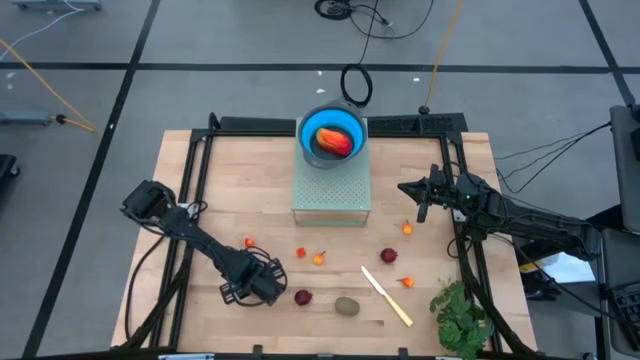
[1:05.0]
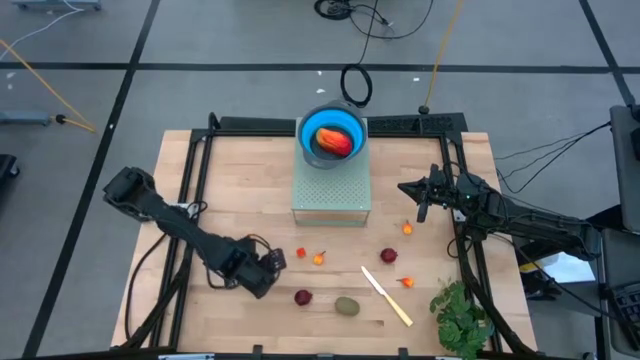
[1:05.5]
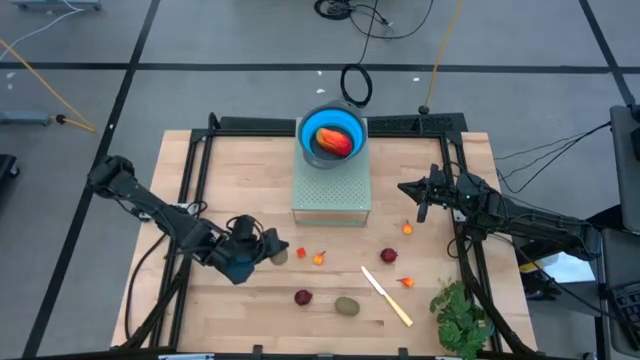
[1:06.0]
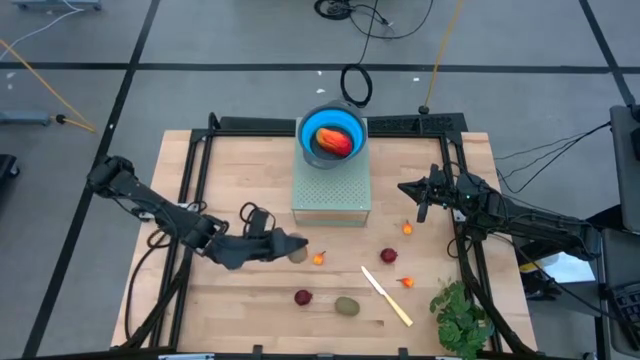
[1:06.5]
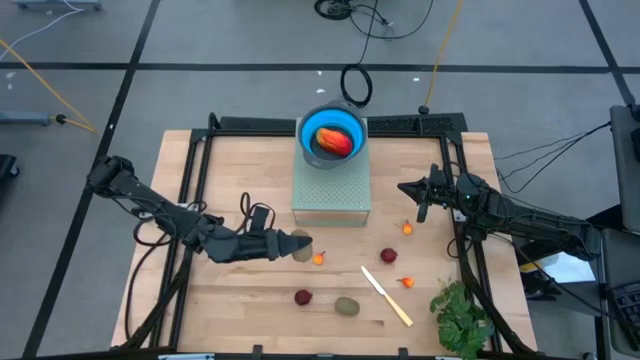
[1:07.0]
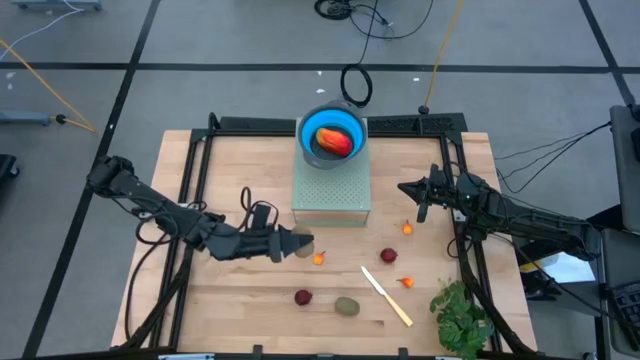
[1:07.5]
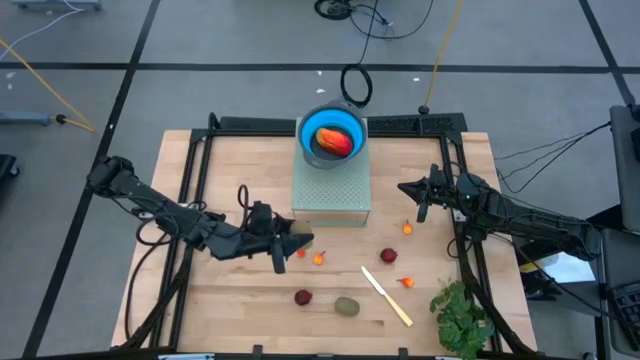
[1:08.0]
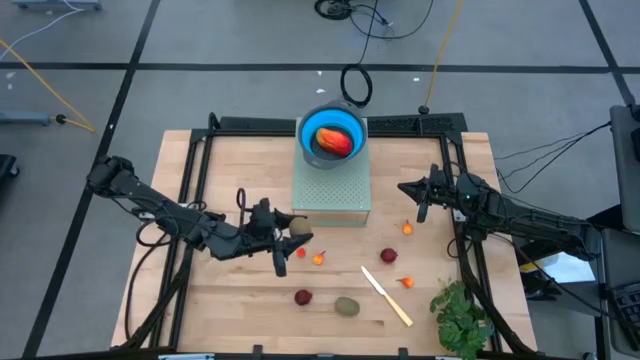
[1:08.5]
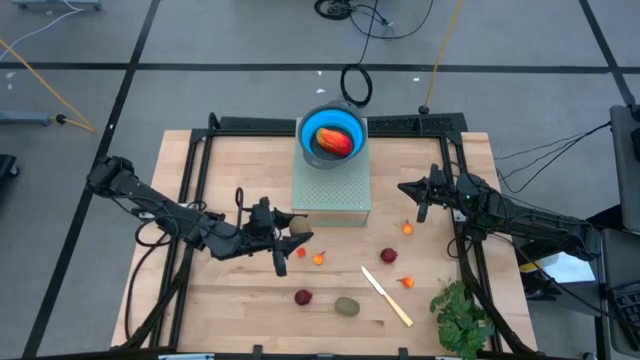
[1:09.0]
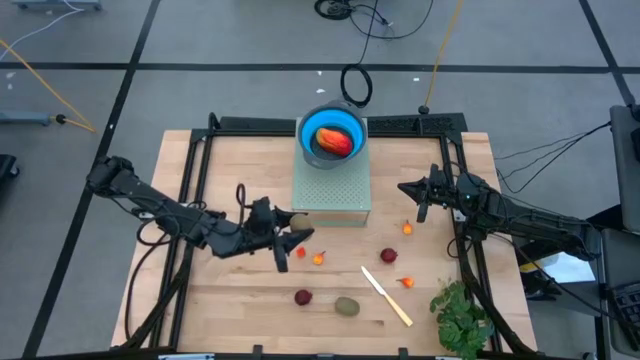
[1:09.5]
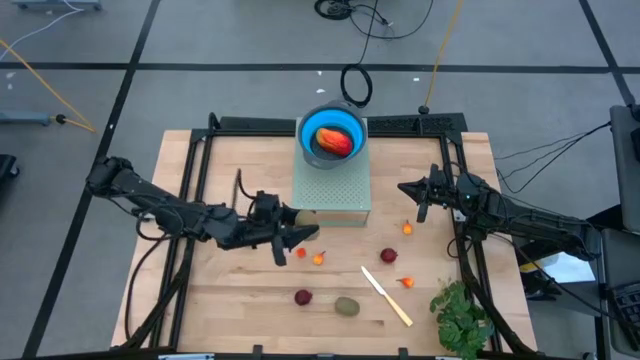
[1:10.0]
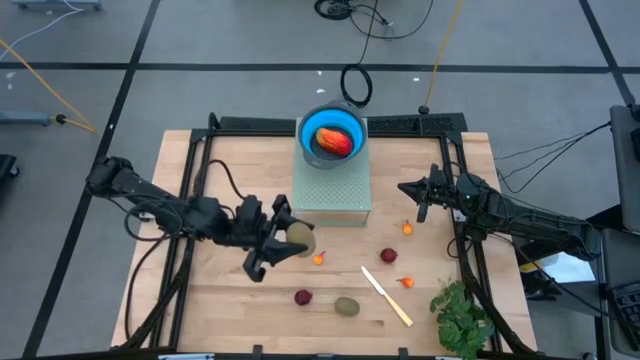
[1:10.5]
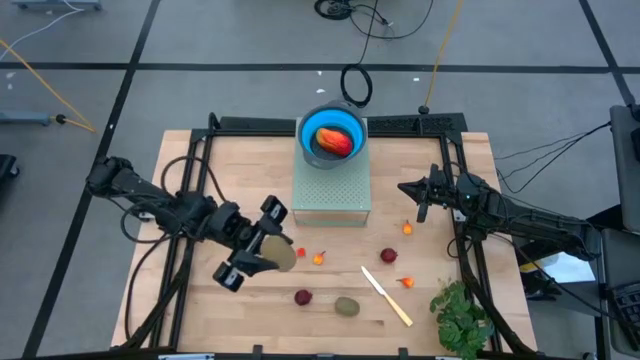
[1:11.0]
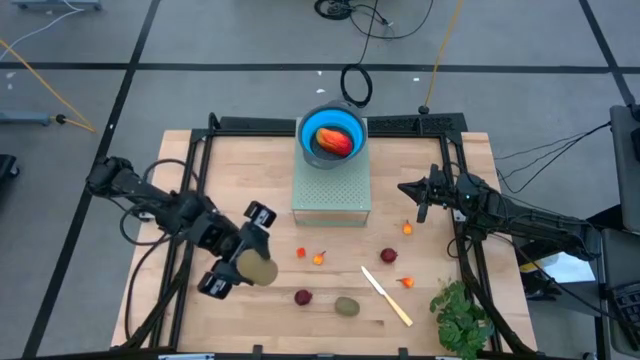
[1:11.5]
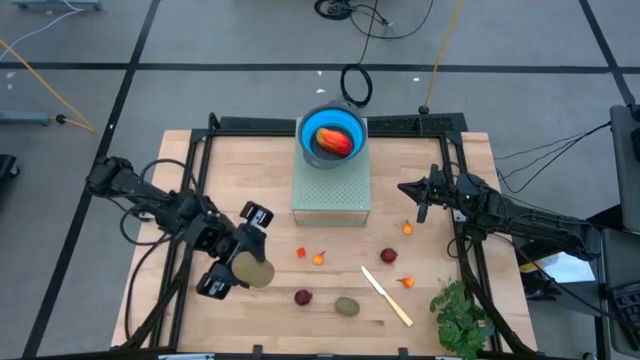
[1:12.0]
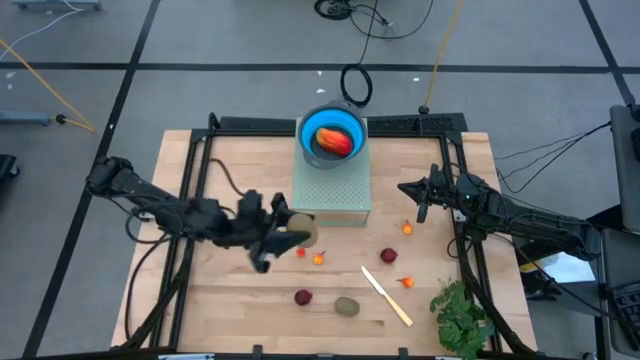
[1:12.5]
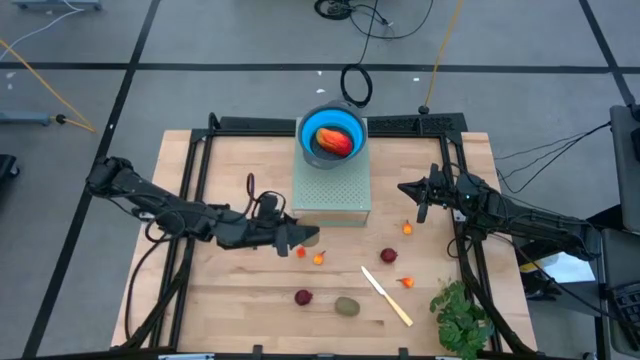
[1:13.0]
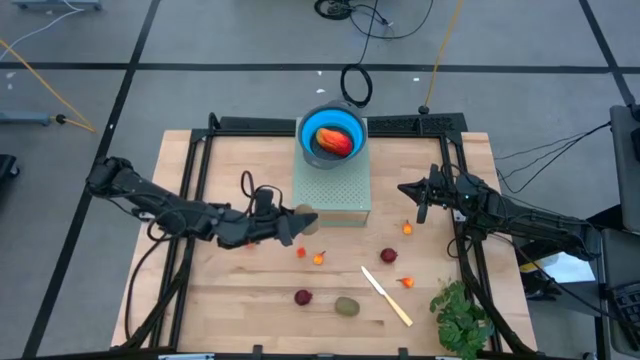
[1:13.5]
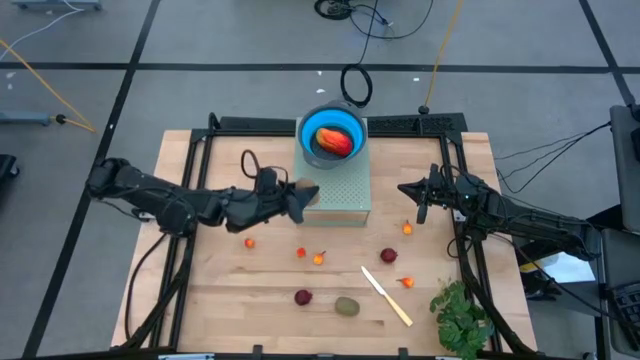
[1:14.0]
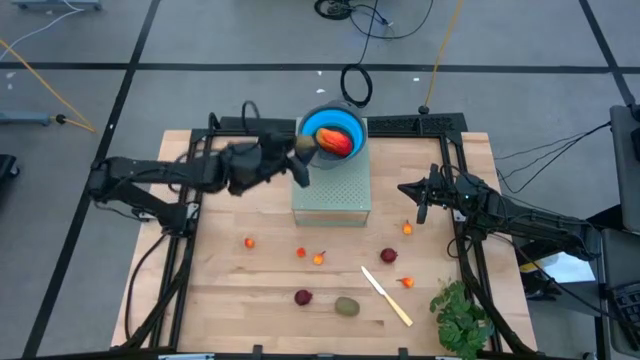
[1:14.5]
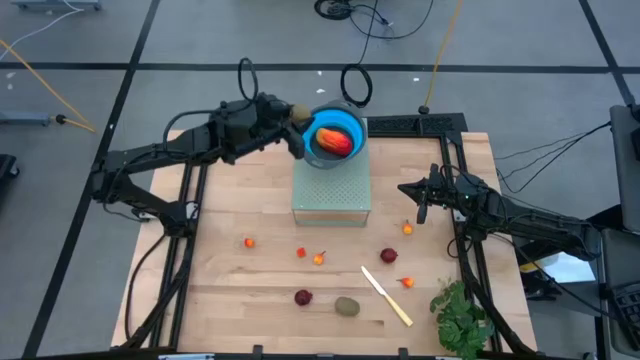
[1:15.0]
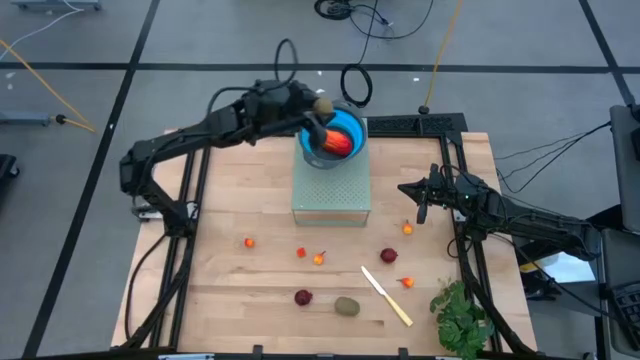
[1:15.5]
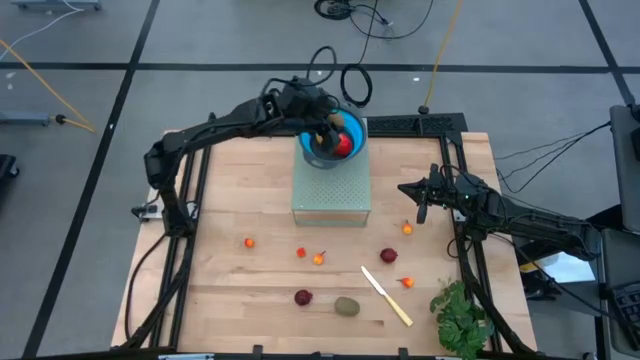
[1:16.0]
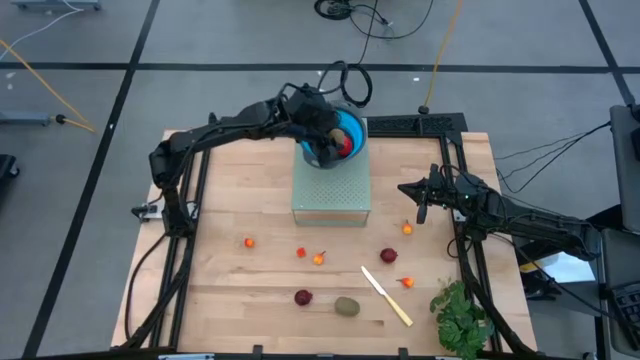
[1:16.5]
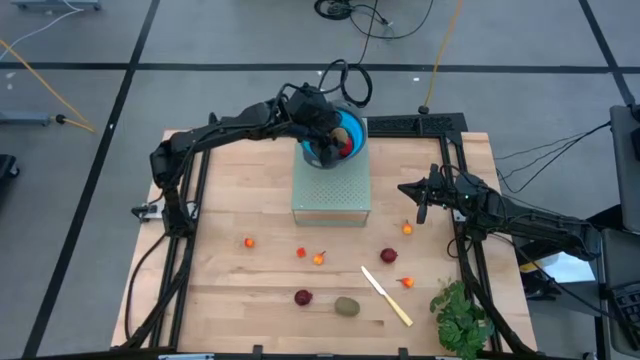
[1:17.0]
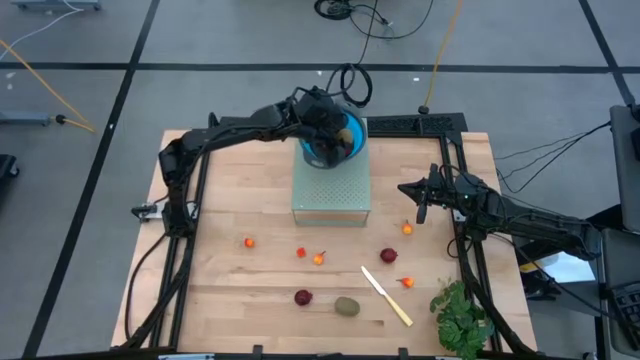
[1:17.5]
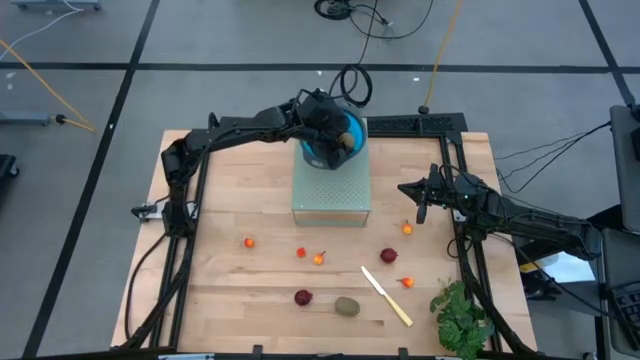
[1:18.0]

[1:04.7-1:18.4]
Task: Pick & Place Fruit
Put the kiwi into the blue strainer bowl on the shelf

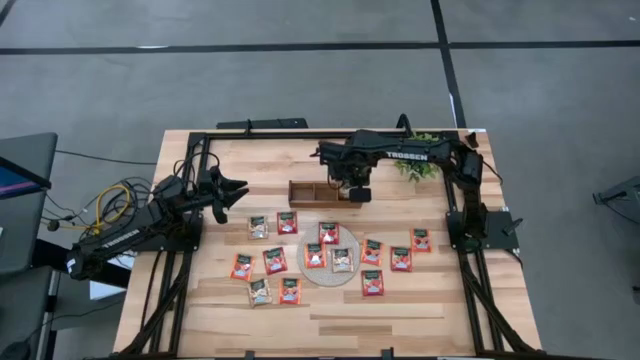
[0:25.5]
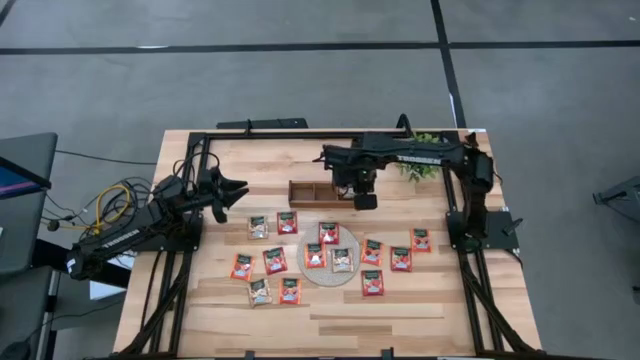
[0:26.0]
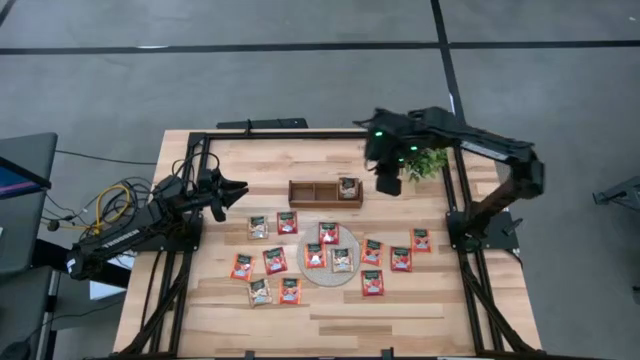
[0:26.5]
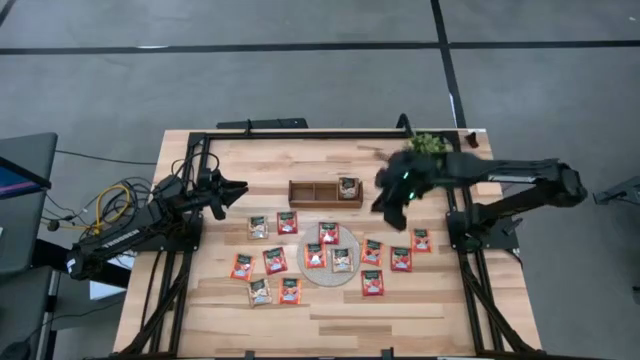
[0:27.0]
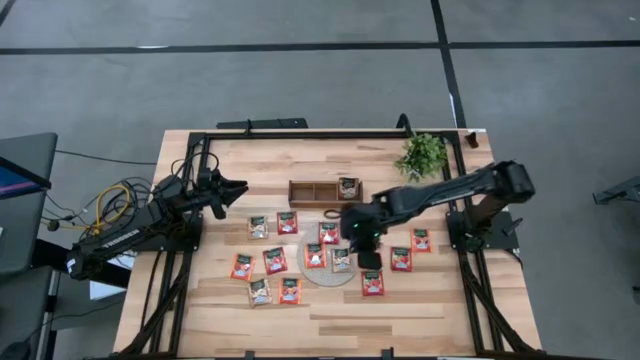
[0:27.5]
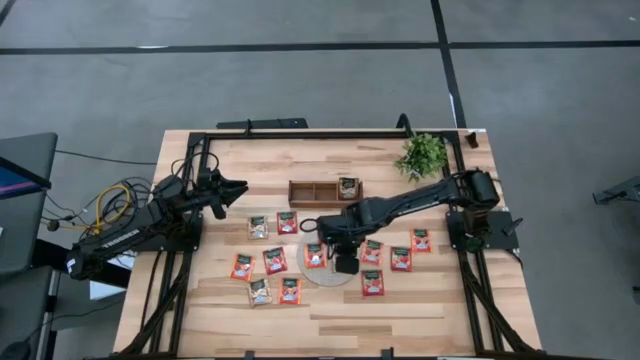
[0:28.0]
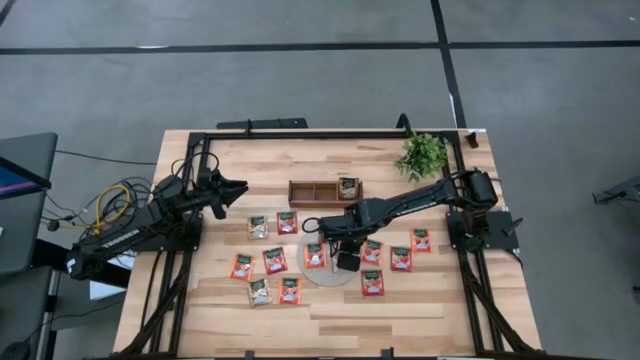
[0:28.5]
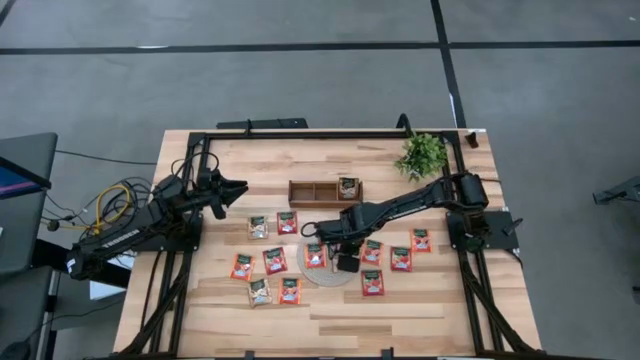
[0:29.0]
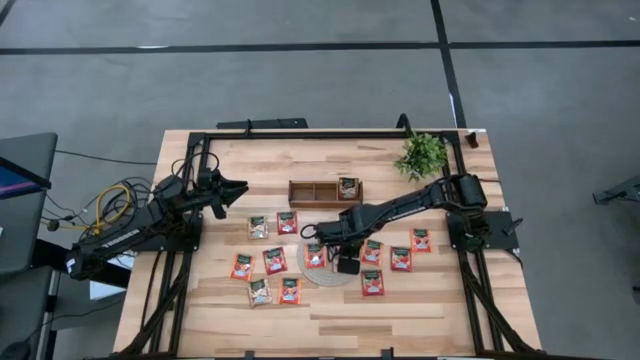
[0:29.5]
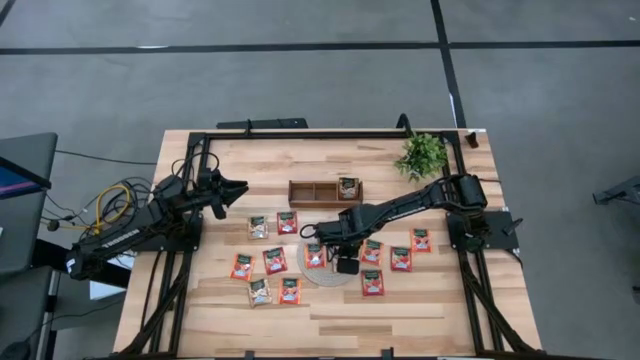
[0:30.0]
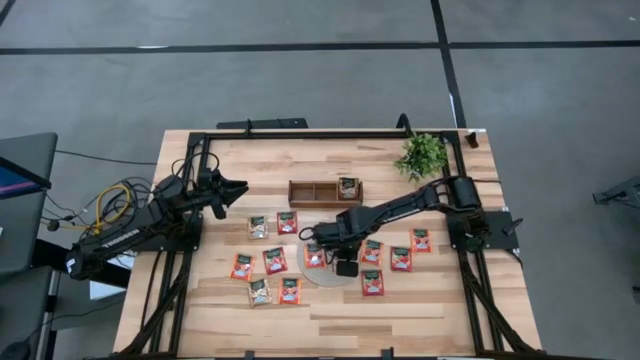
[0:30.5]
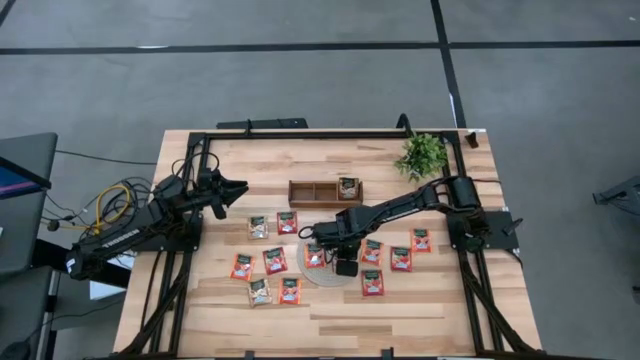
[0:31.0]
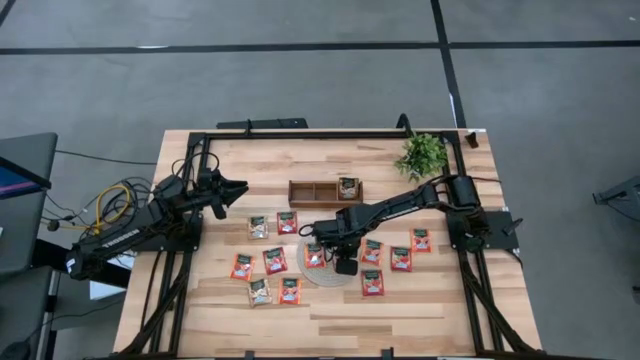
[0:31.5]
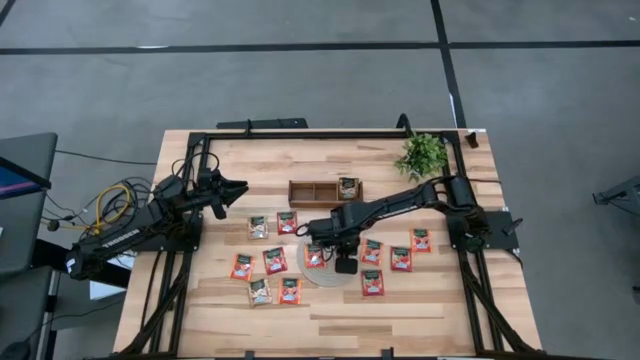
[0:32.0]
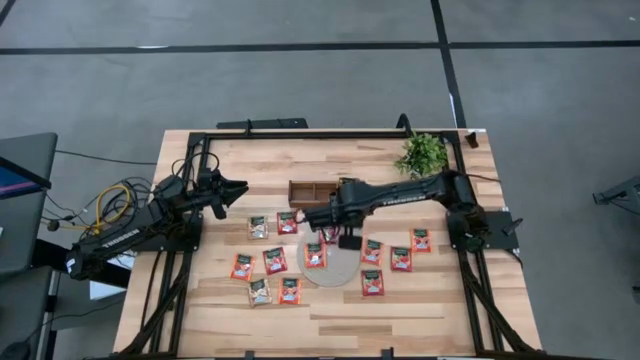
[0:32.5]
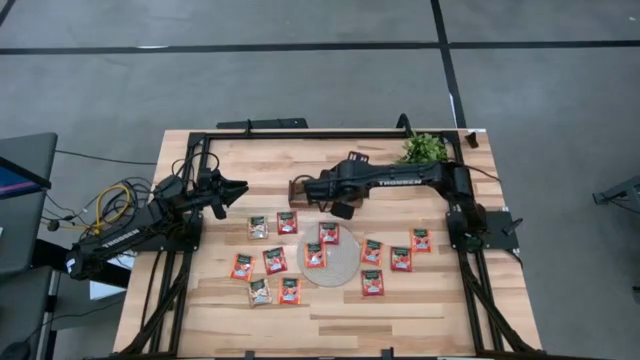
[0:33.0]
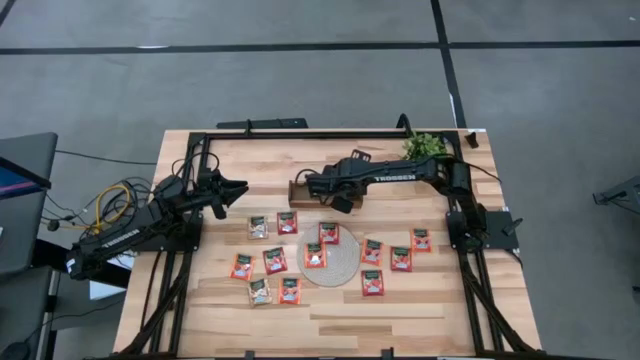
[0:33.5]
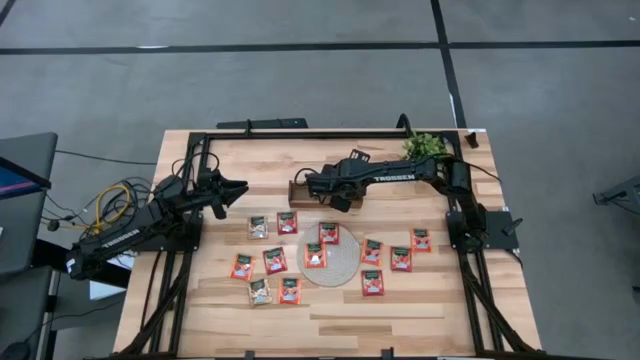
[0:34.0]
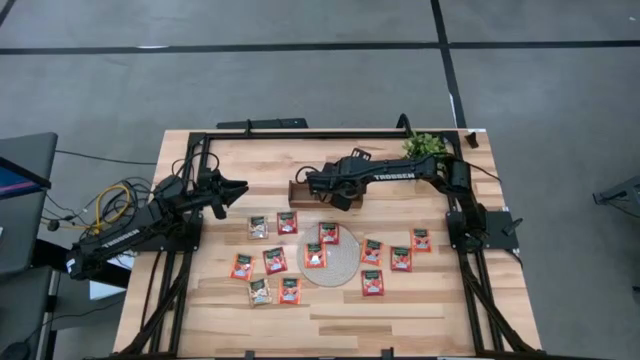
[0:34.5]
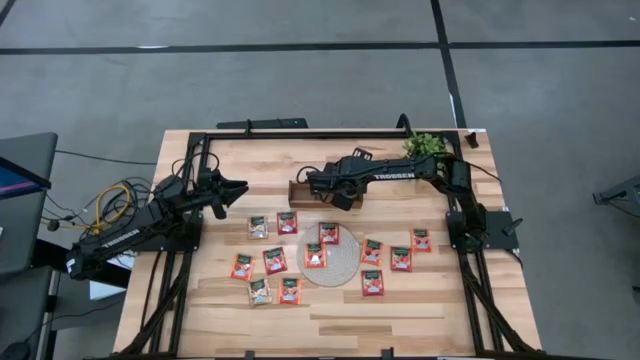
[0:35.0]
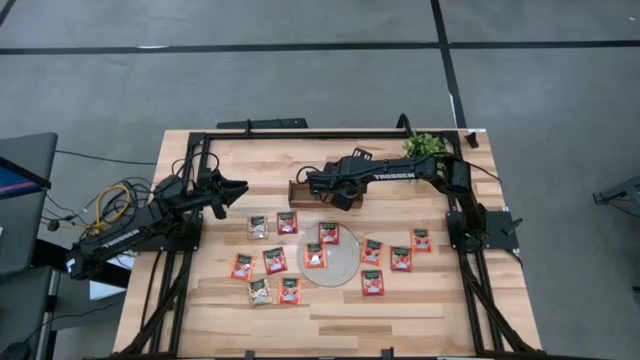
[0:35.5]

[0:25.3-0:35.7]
Task: Pick & Place Tea
Put the brown tea bag into the right section of the wooden organizer
